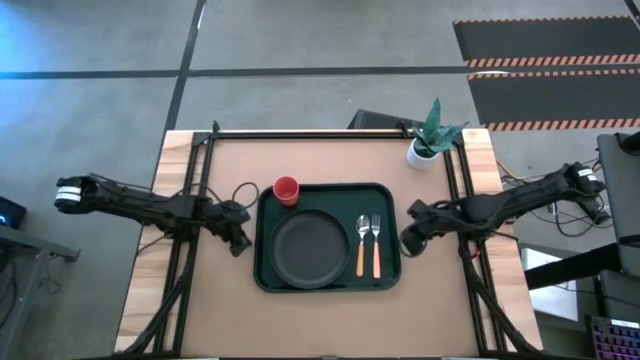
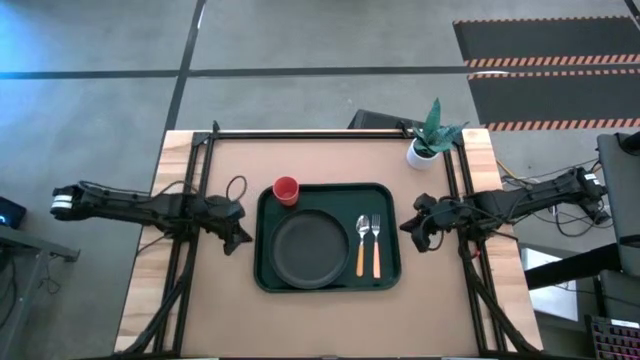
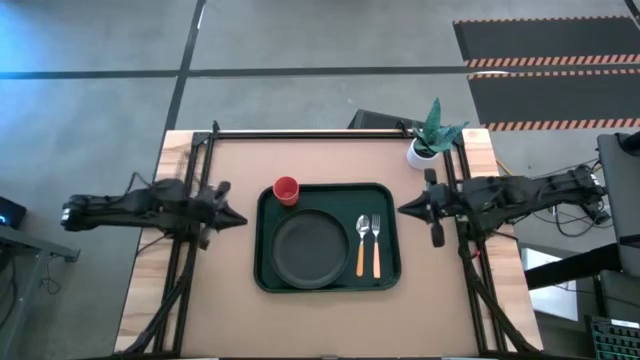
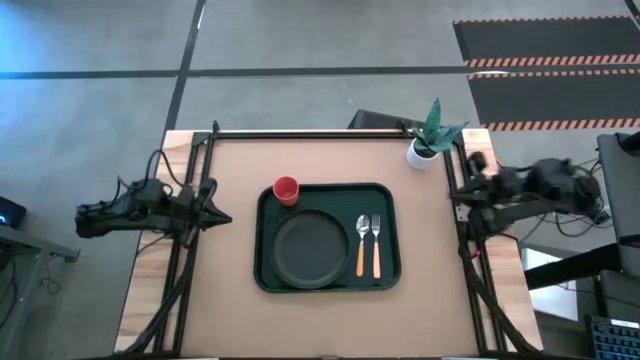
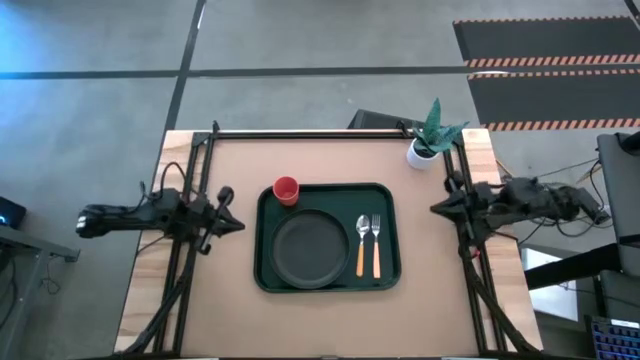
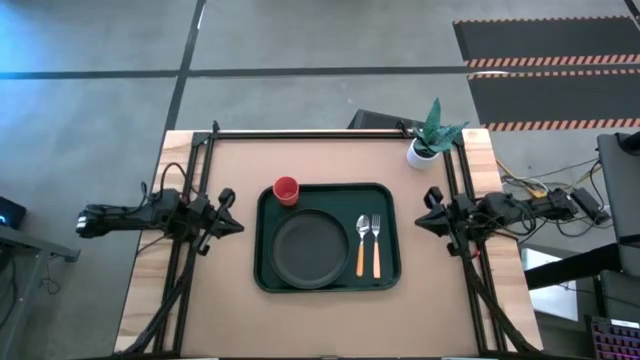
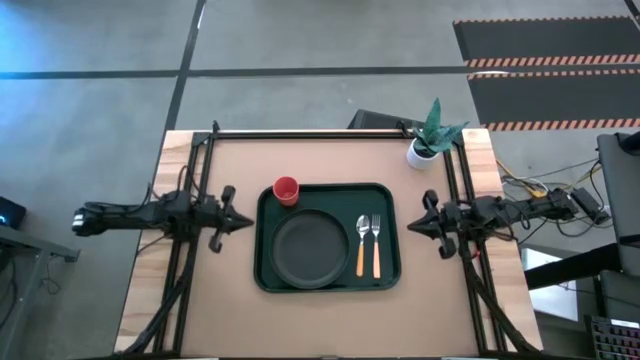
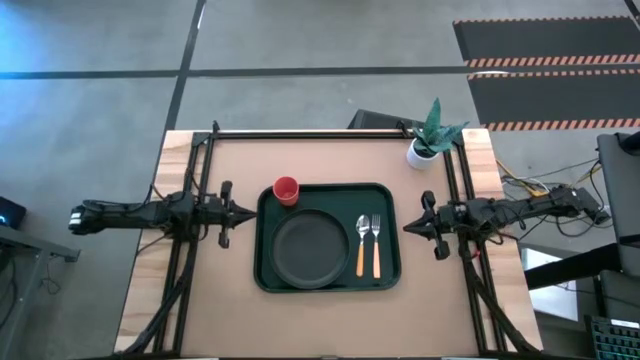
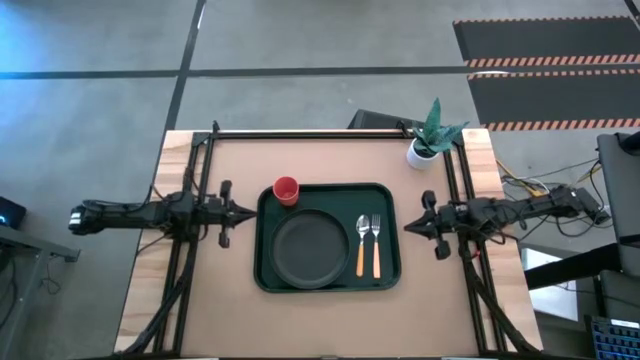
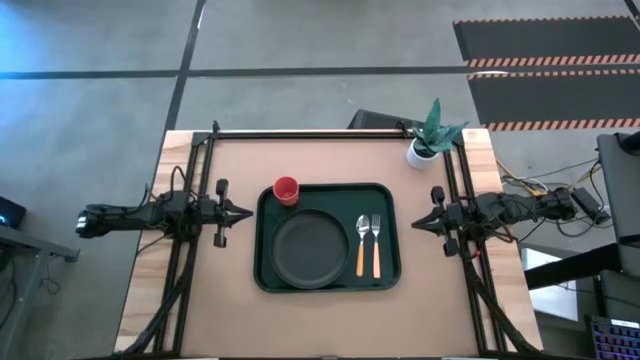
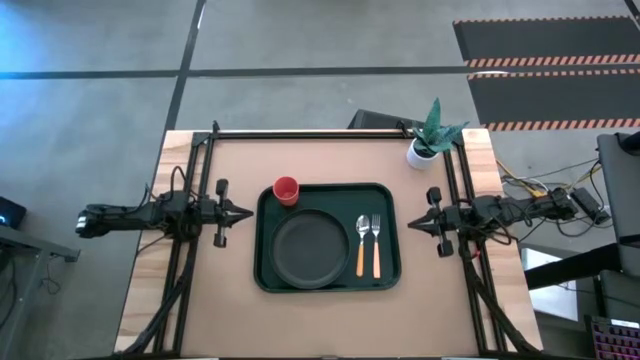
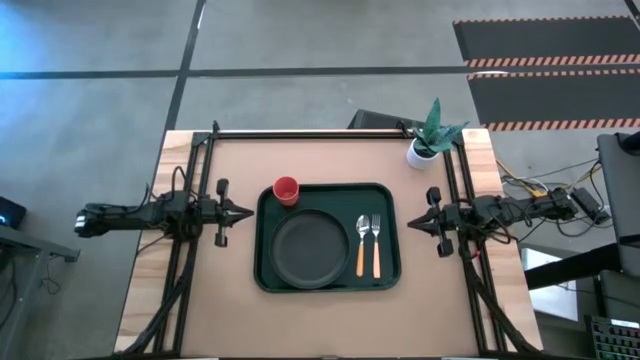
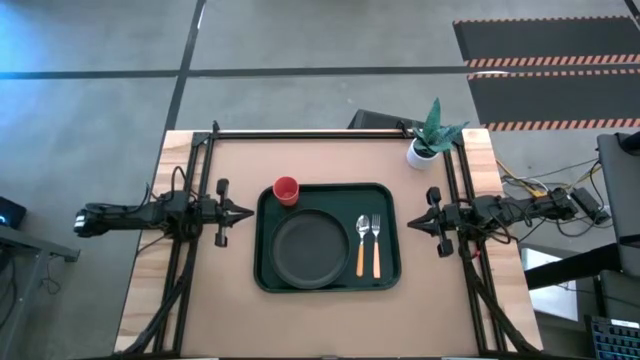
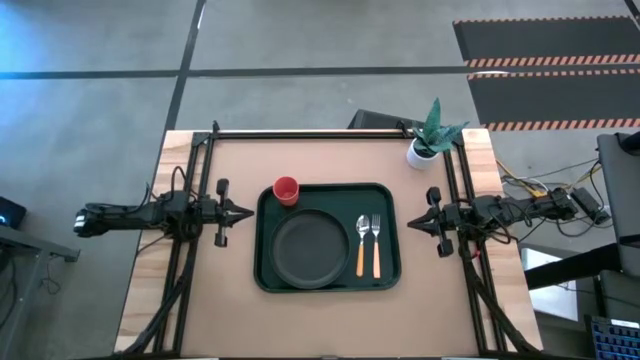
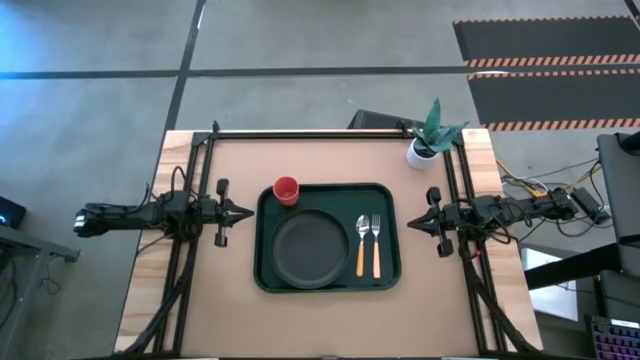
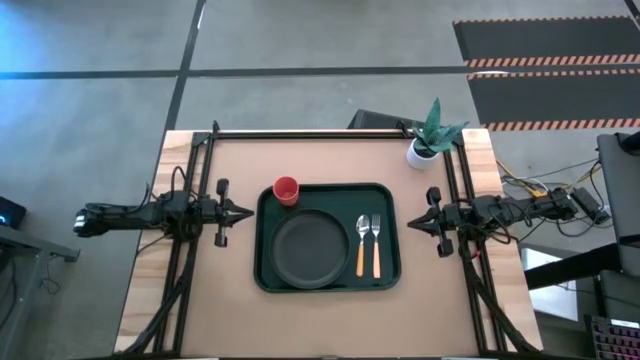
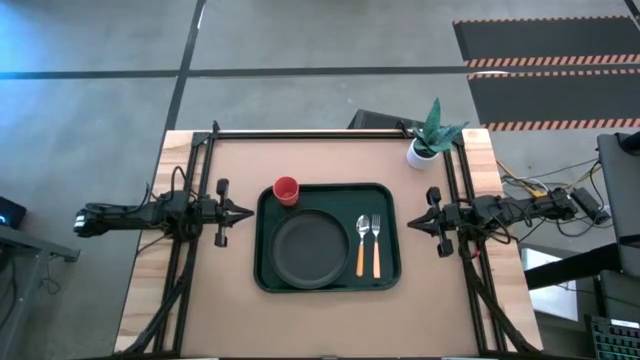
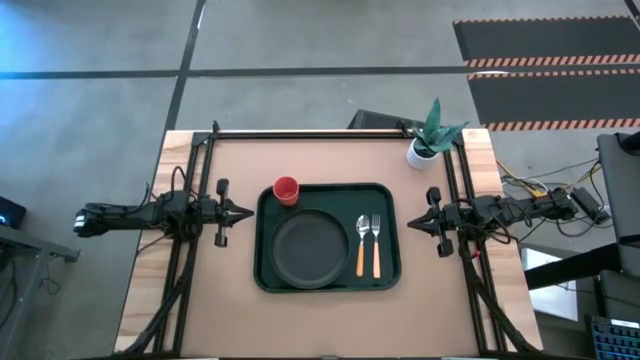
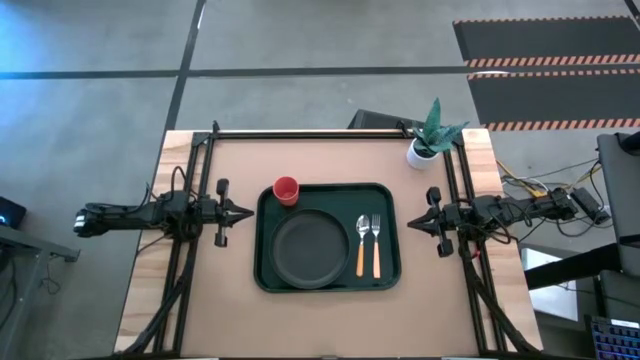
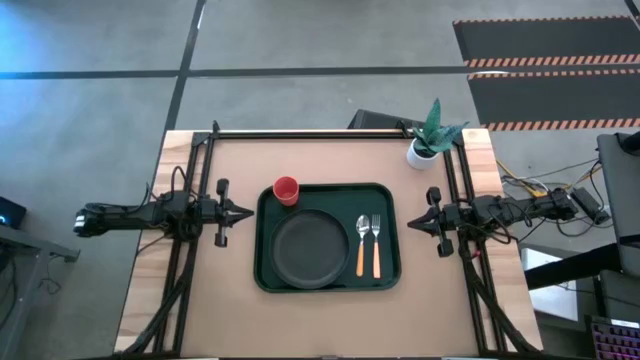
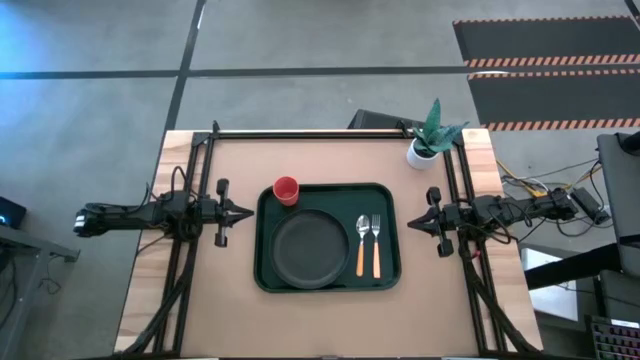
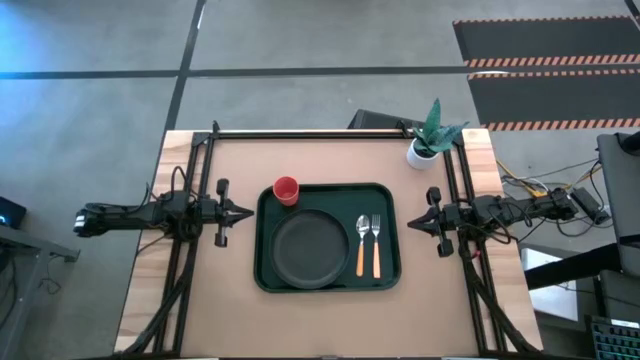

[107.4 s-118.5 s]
Task: Pick and place plate/cup/fork/spoon on tray
Return to Home Position

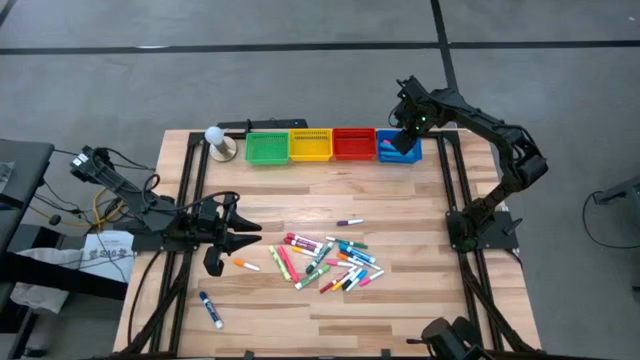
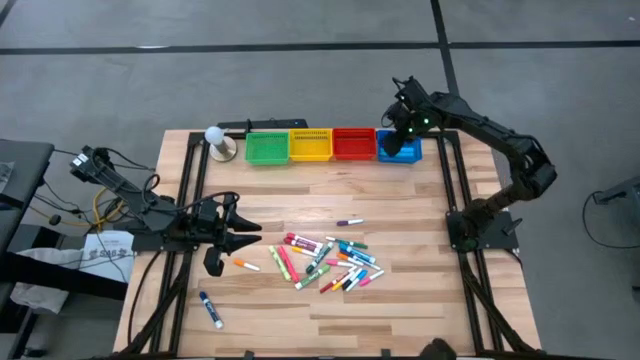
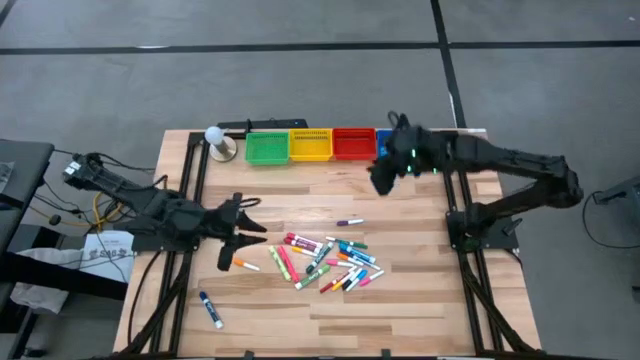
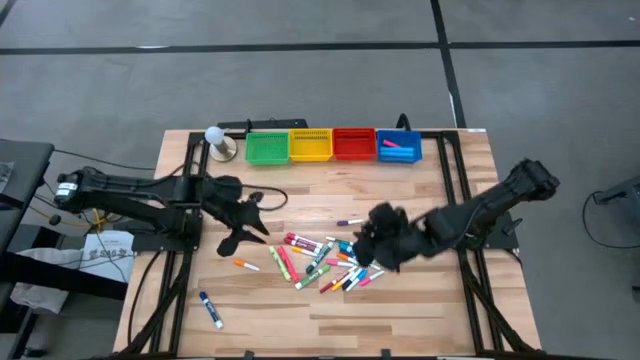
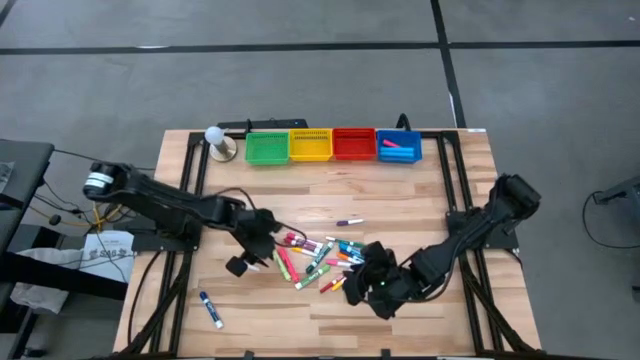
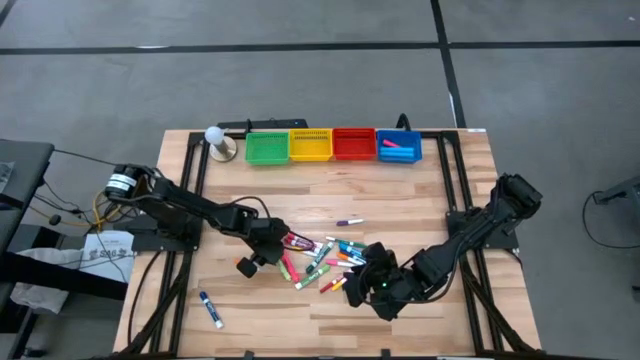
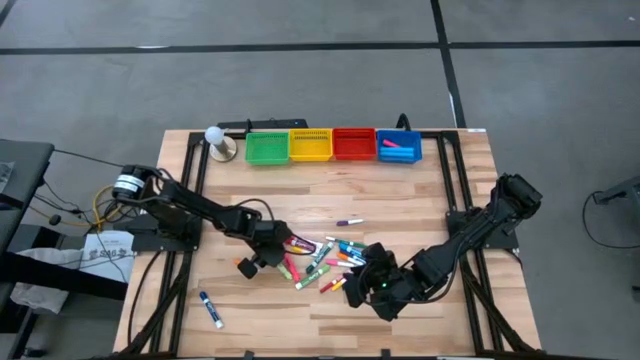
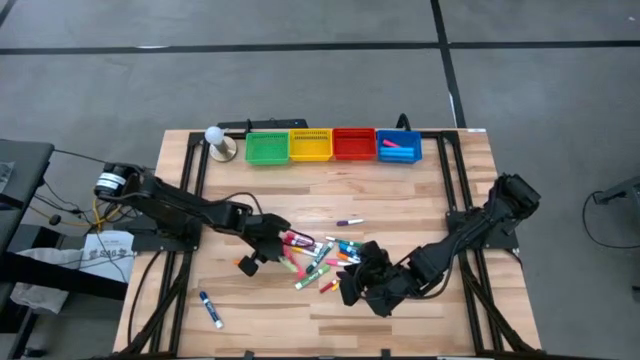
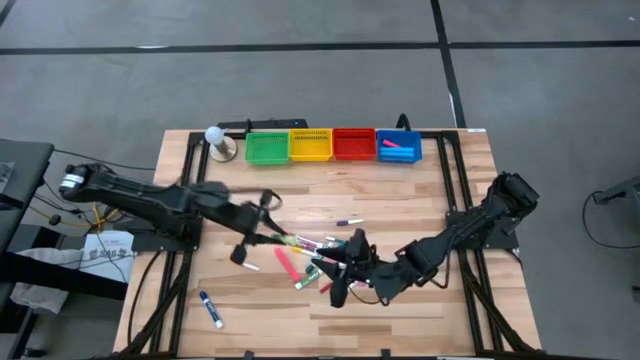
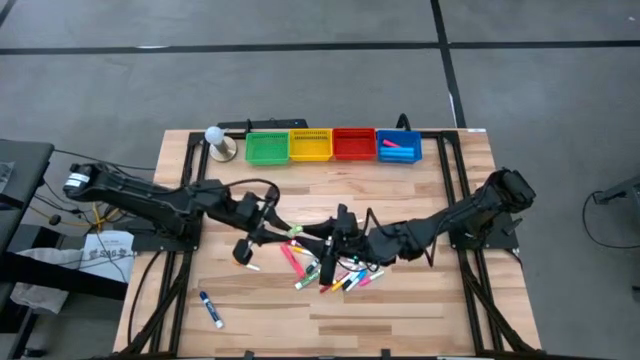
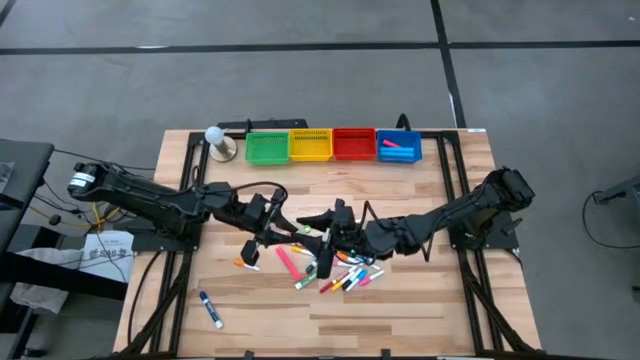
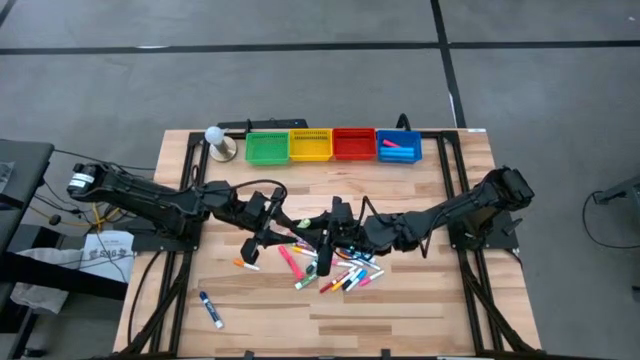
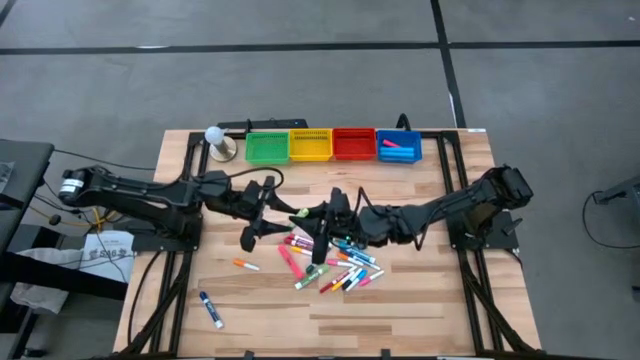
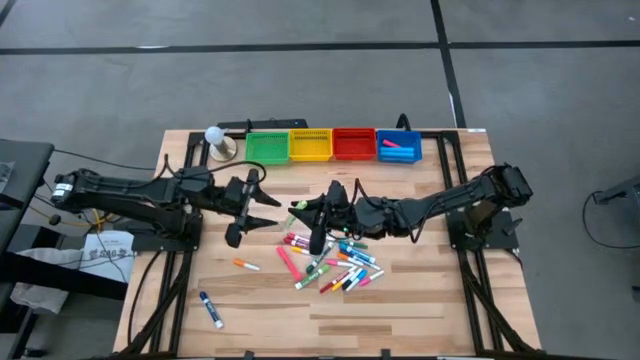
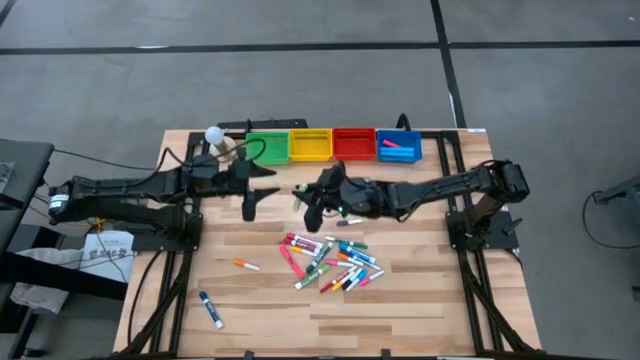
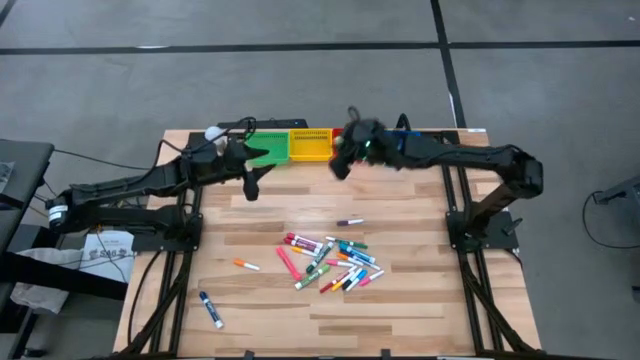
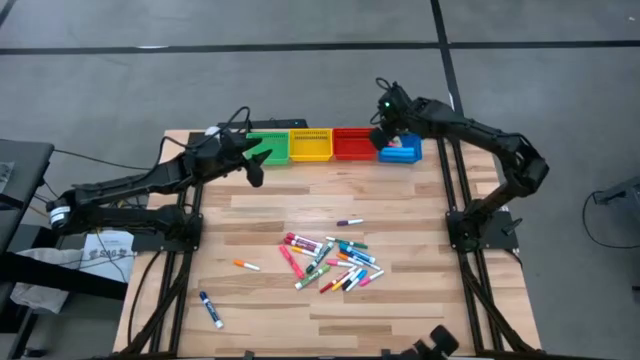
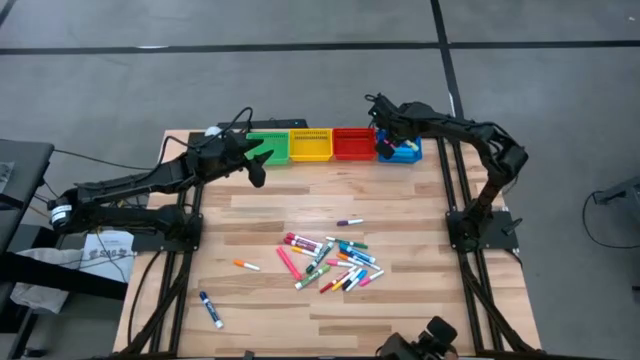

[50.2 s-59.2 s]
Task: Pick & Place Markers
Put the light green highlighter pen into the blue basket
